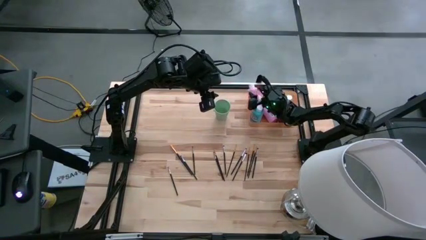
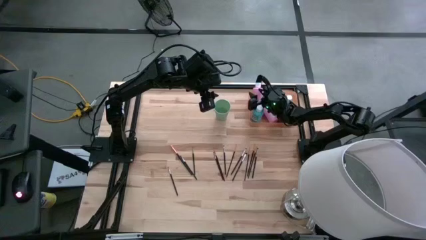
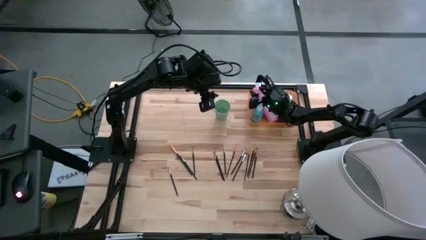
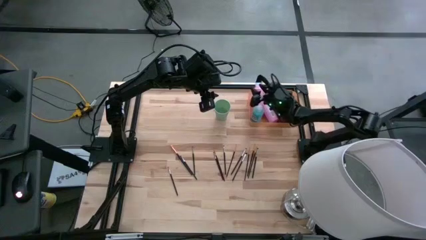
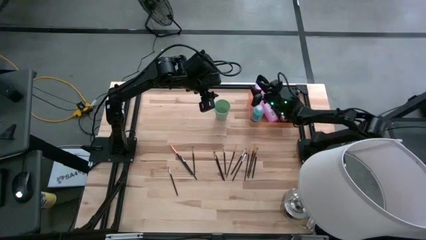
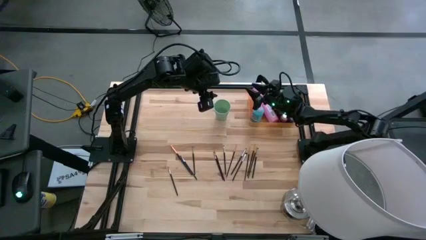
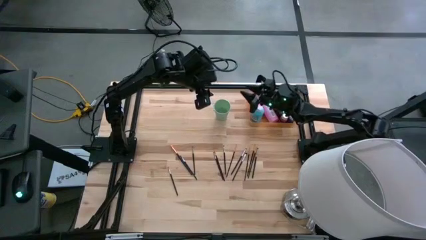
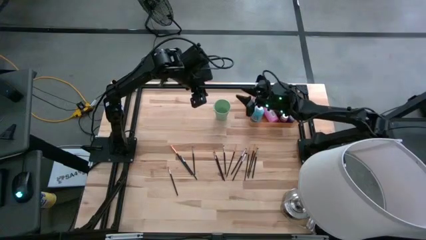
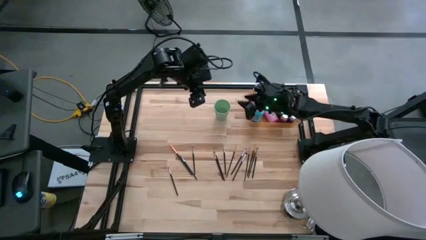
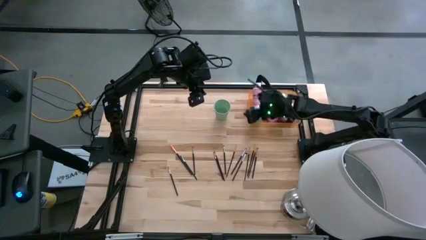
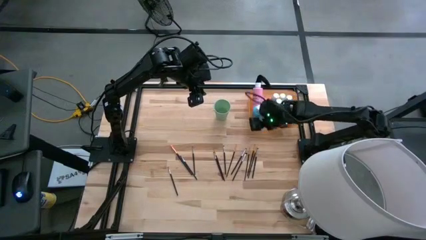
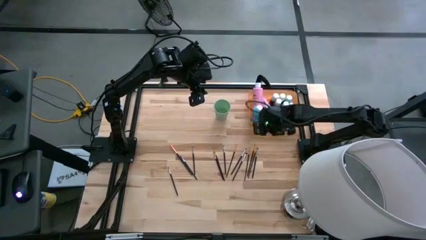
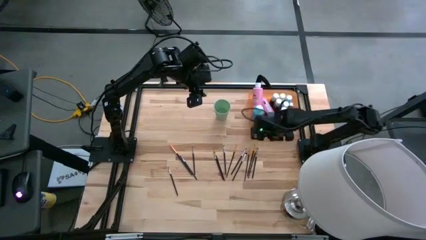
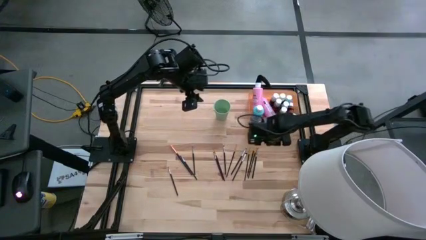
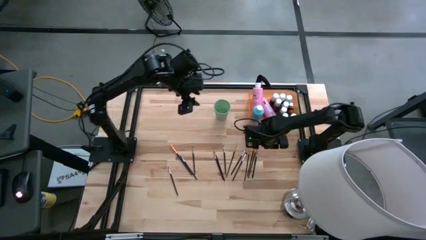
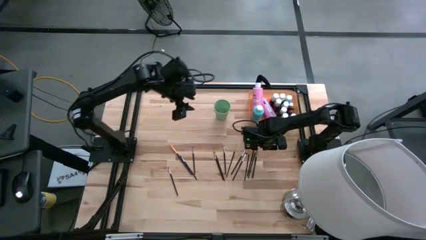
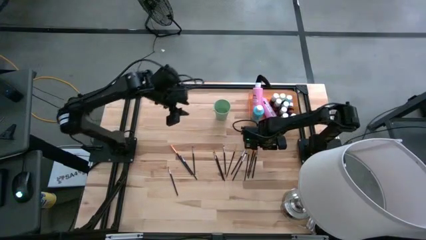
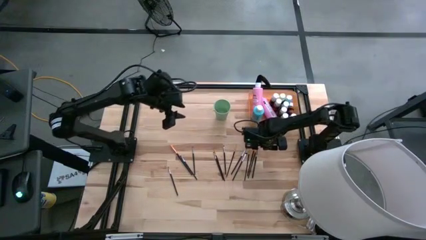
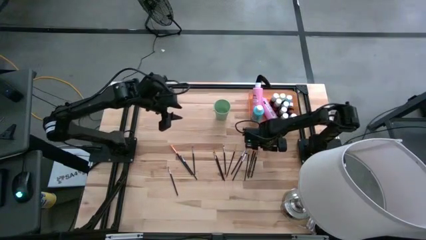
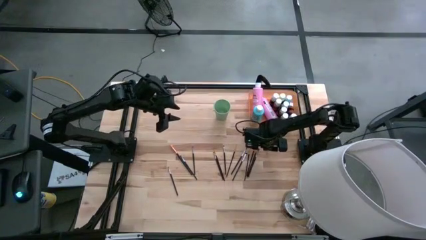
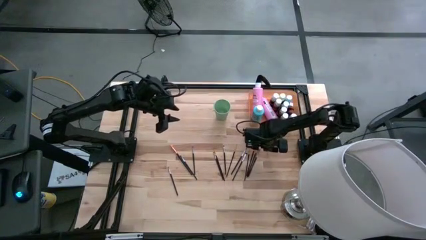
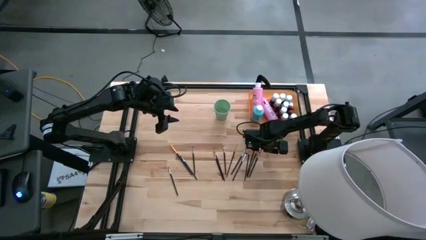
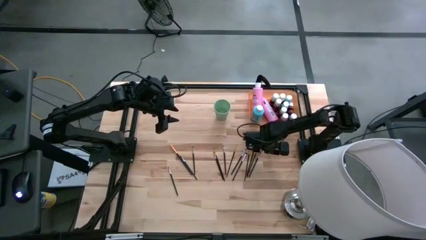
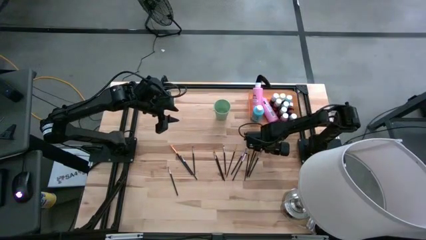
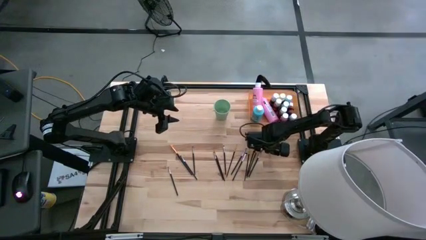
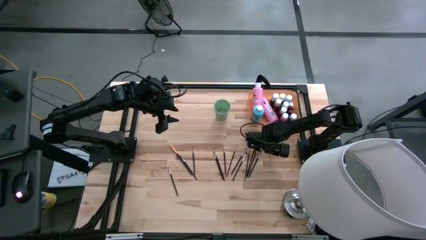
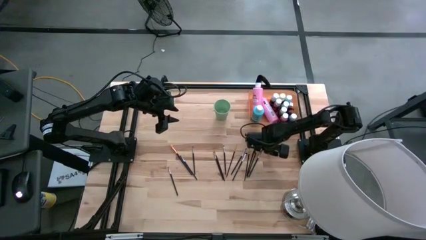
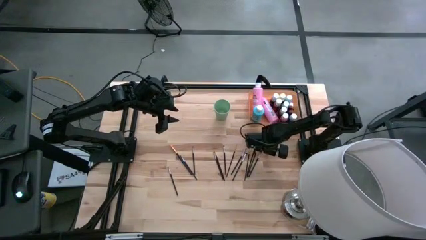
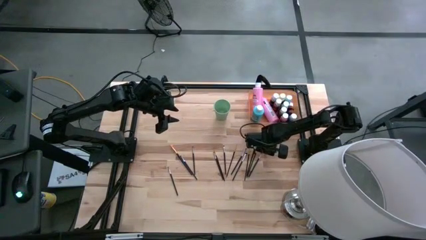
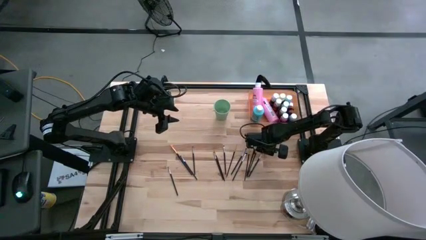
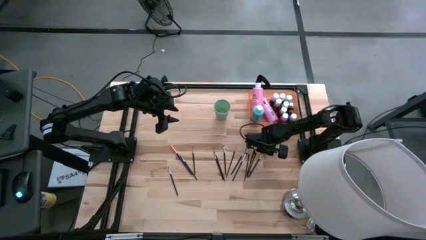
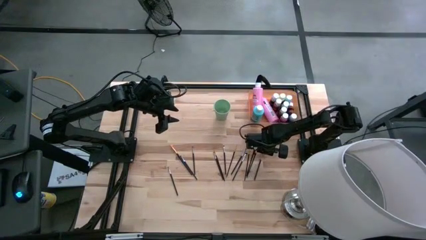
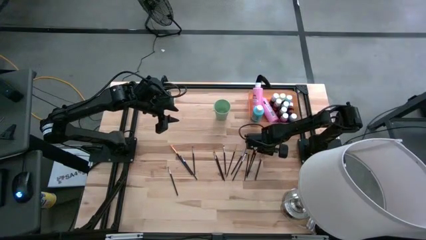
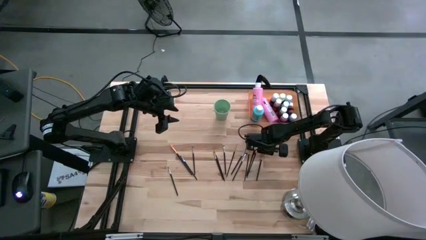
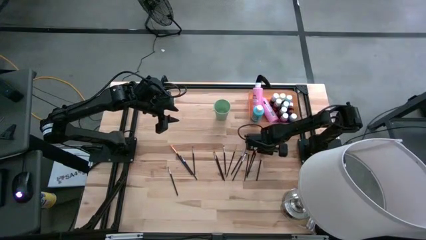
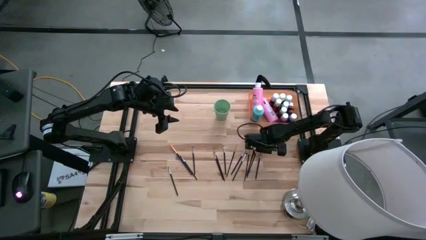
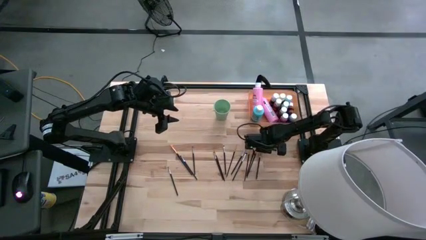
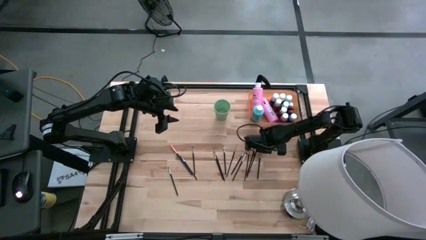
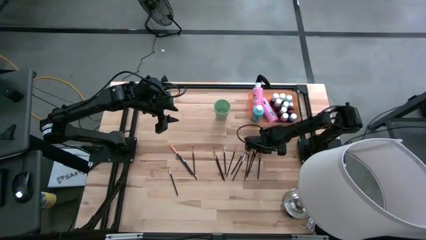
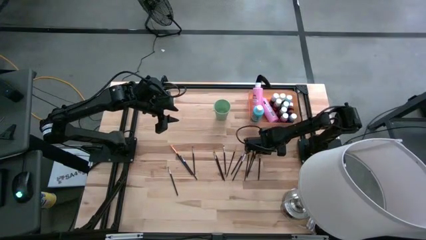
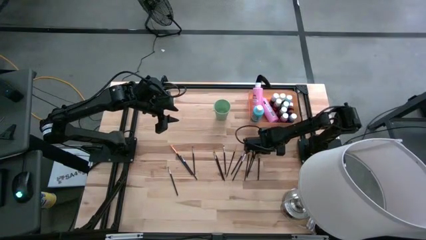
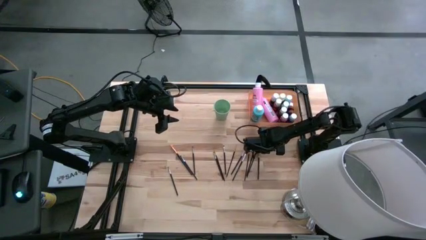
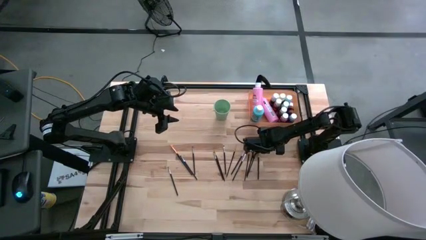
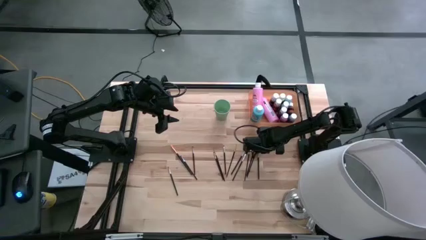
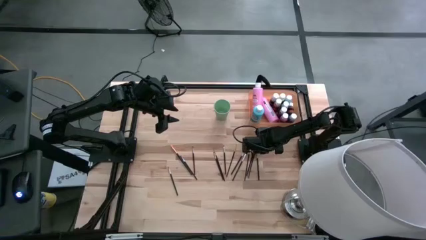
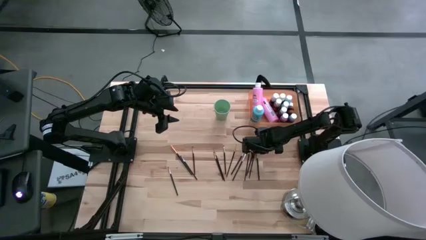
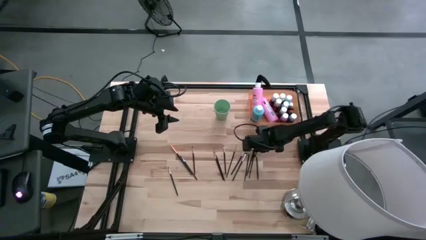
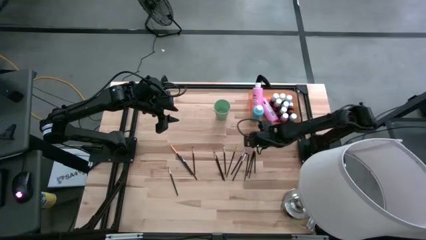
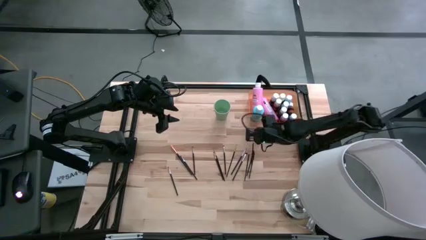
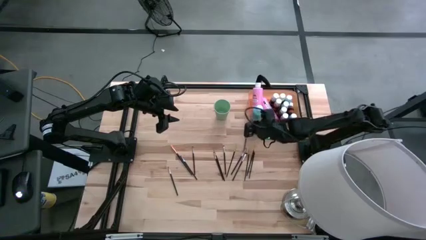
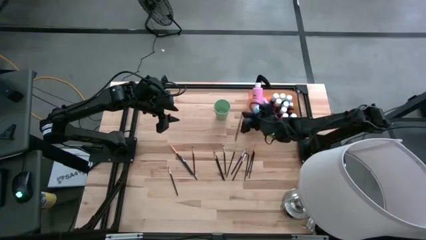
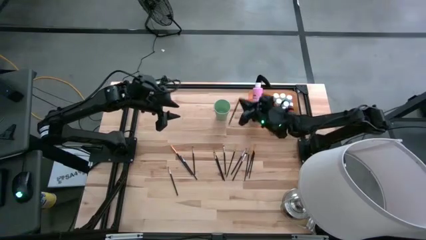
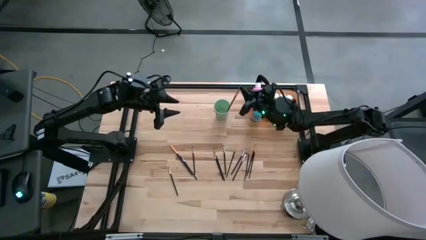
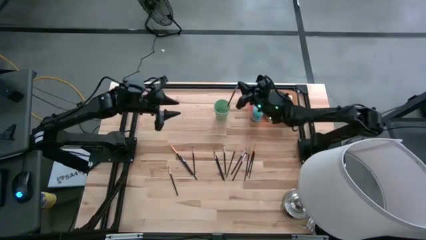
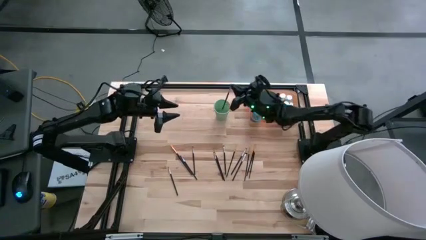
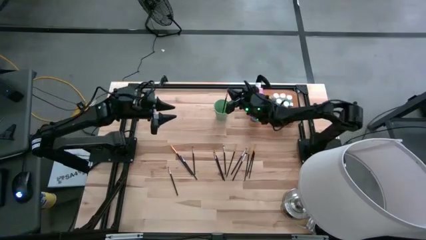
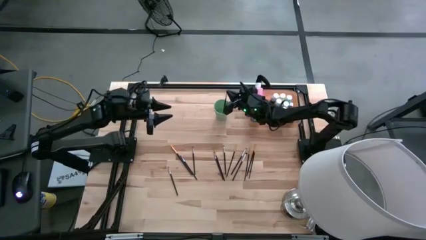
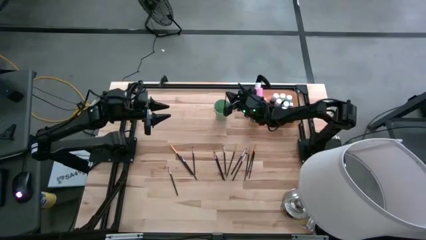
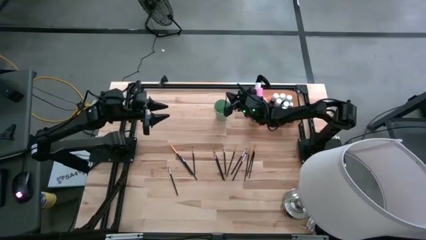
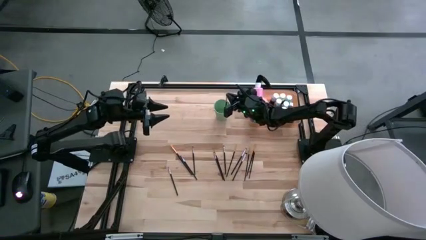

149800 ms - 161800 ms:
Task: Pick & Place Paint Supplies
Put the silver paintbrush into the green cup

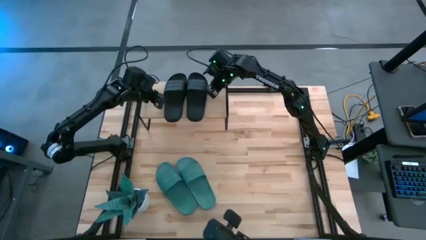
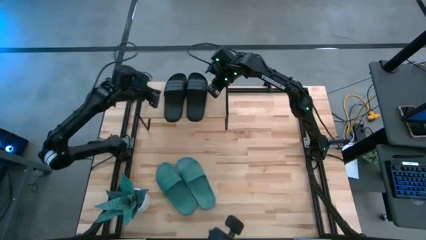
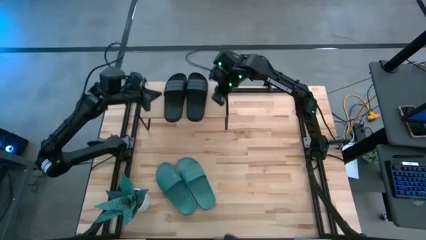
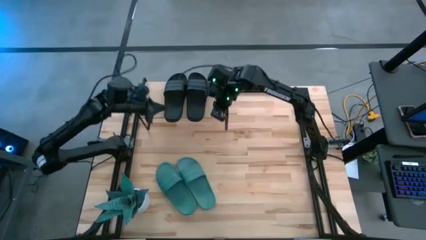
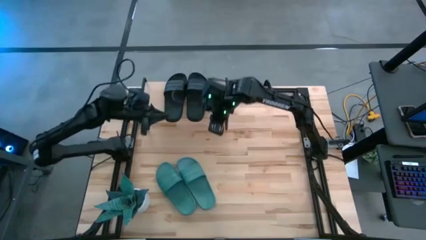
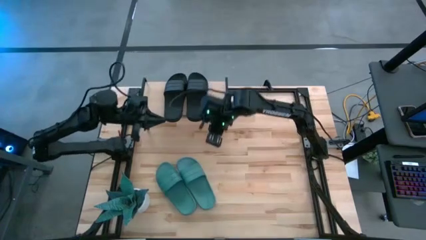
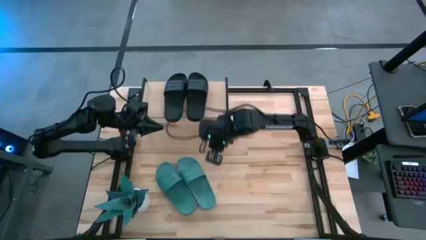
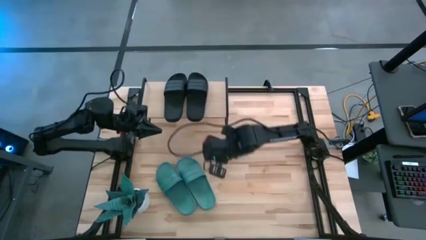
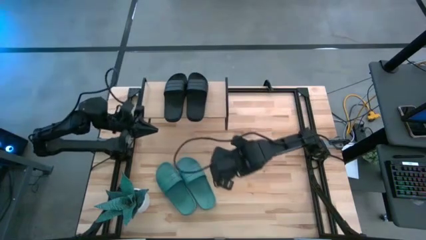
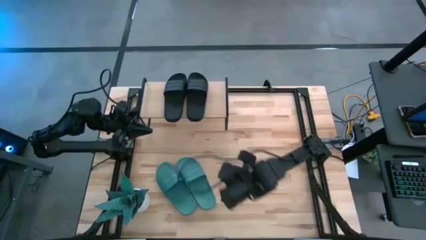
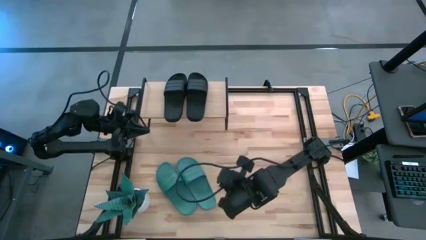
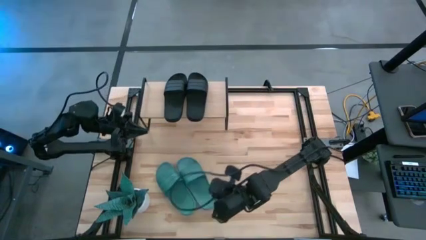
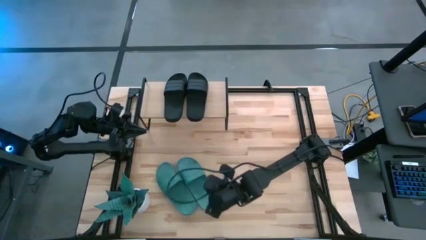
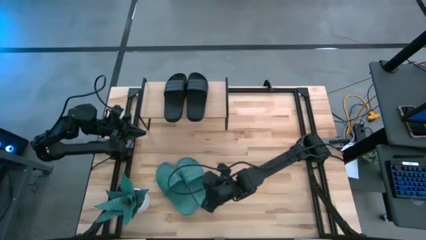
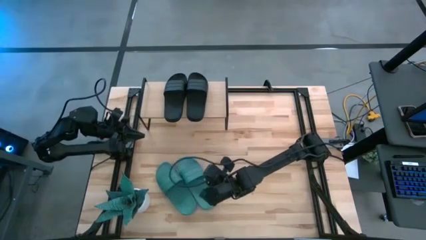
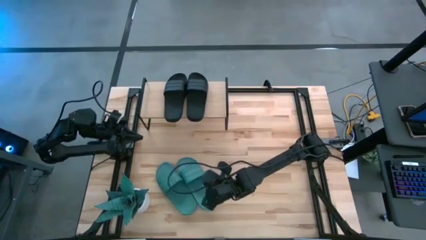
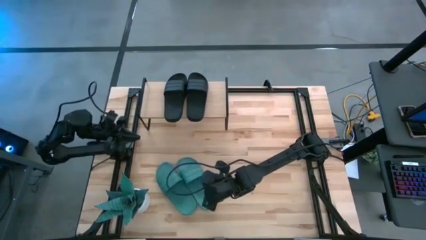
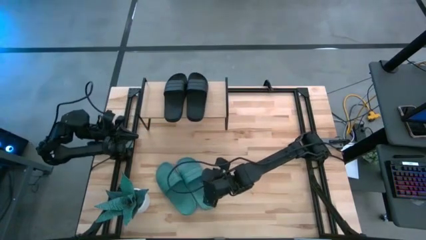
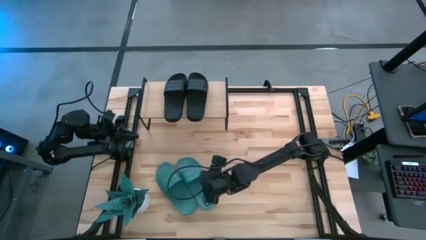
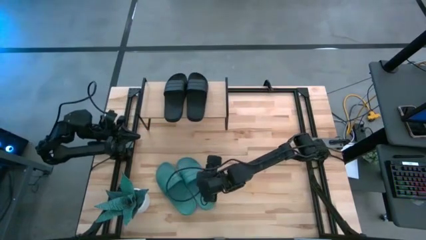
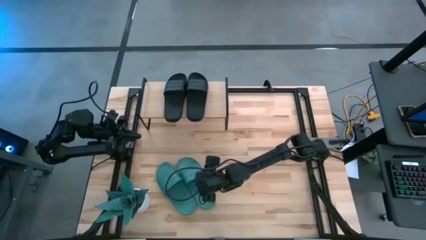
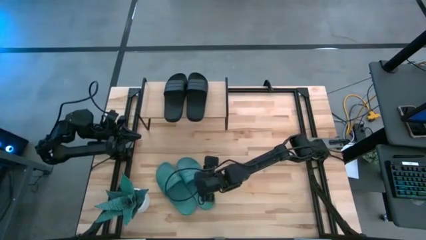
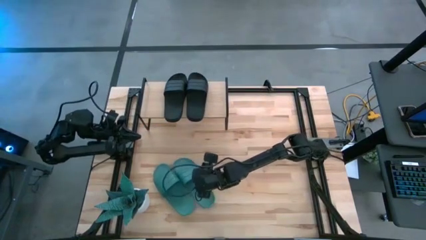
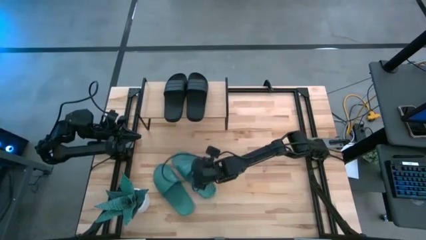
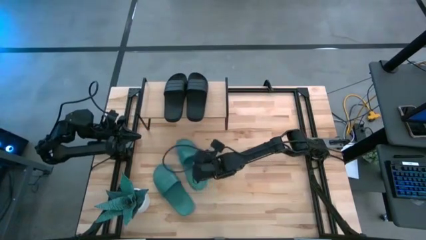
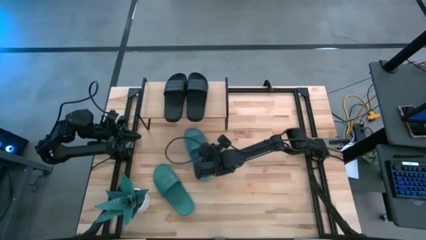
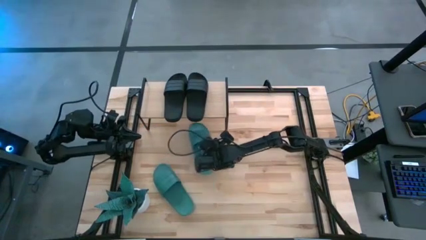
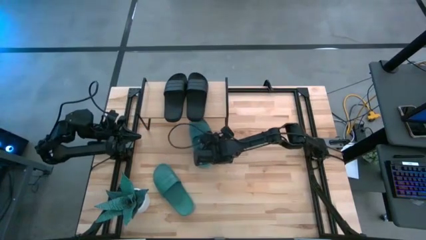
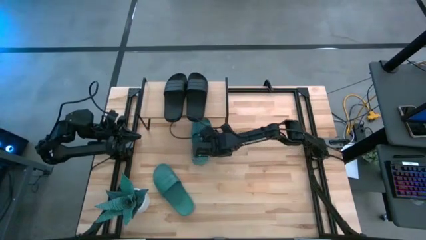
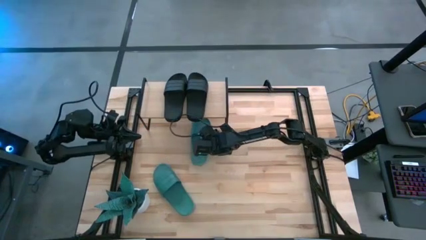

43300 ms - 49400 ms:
Task: Pick and place slides into the shelf
Put the green slide under the shelf
